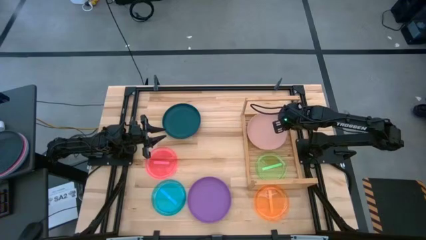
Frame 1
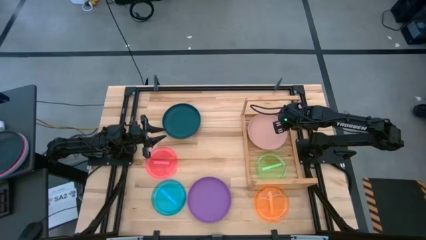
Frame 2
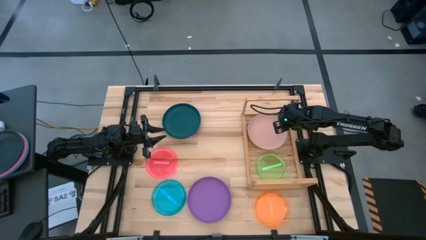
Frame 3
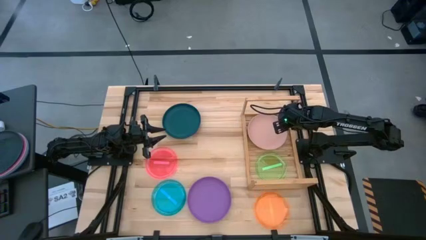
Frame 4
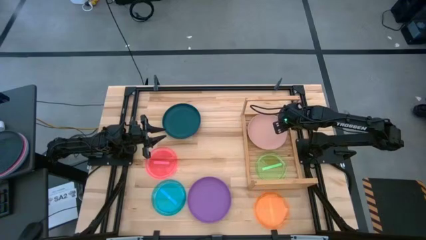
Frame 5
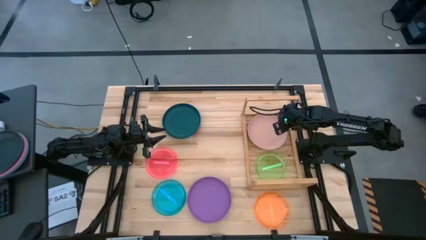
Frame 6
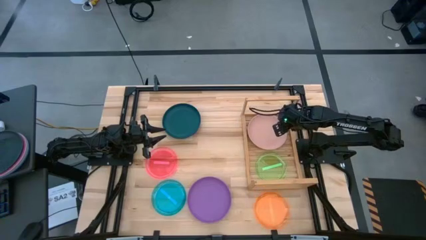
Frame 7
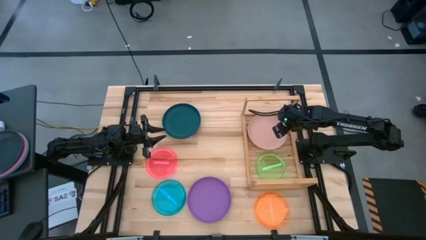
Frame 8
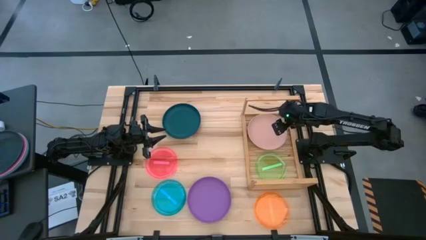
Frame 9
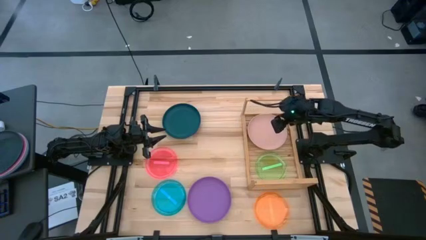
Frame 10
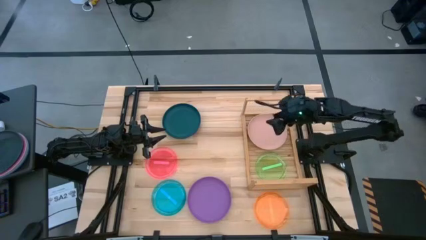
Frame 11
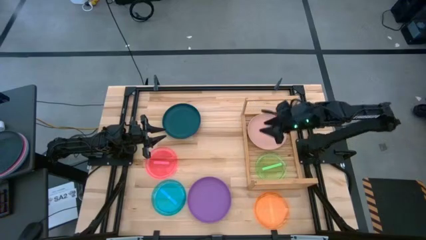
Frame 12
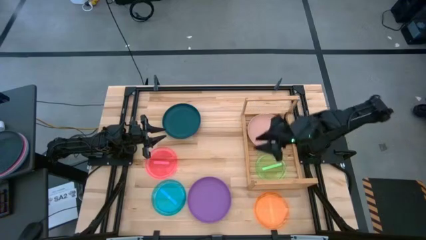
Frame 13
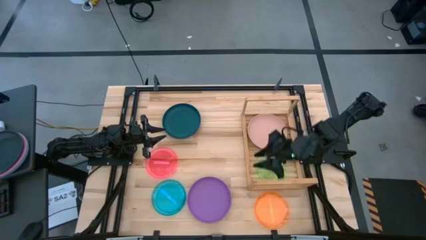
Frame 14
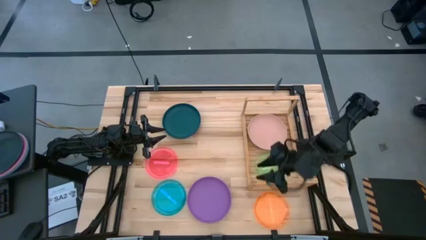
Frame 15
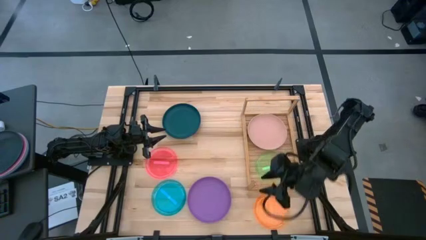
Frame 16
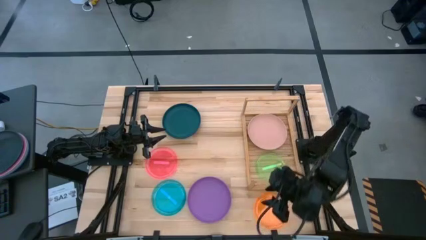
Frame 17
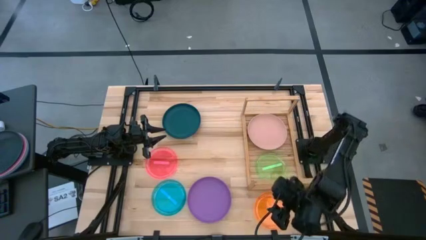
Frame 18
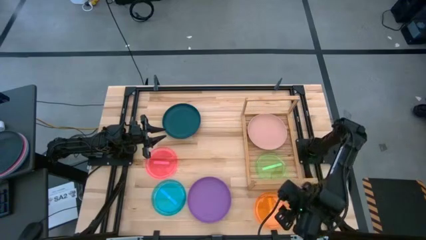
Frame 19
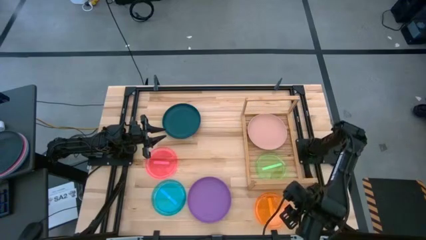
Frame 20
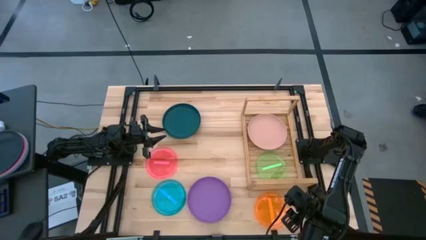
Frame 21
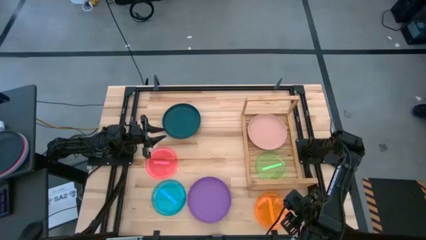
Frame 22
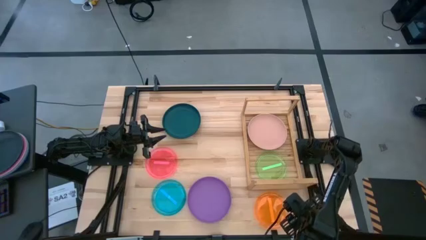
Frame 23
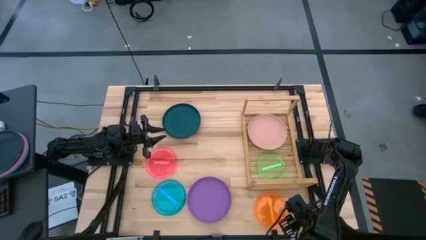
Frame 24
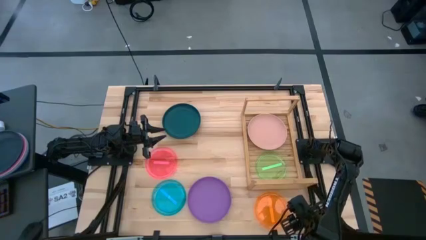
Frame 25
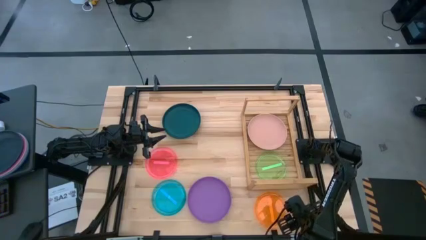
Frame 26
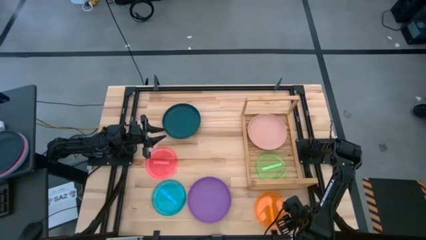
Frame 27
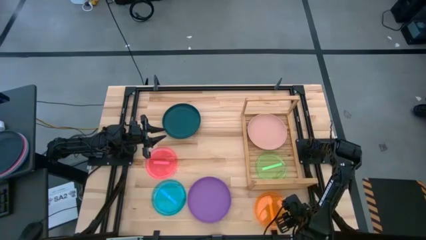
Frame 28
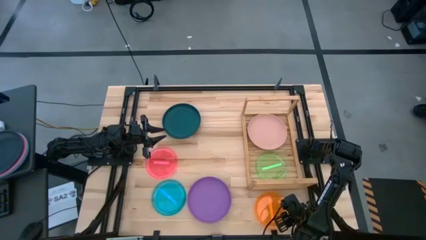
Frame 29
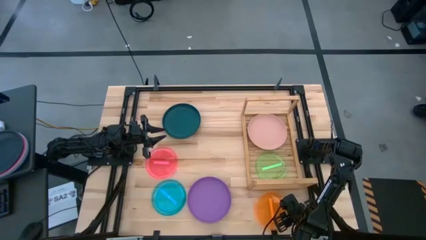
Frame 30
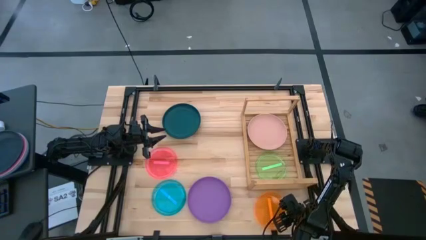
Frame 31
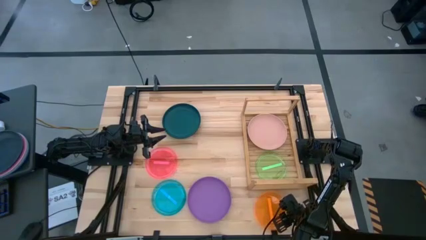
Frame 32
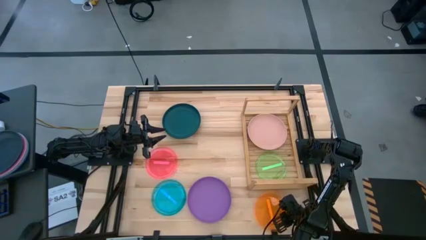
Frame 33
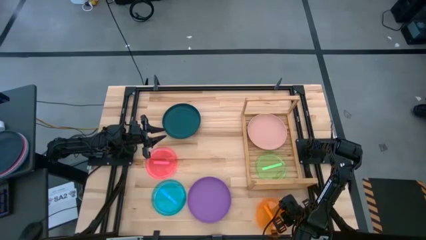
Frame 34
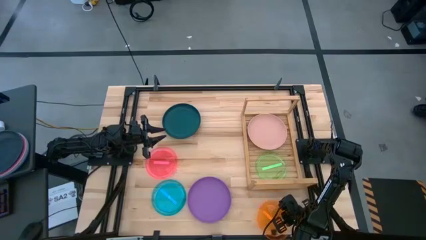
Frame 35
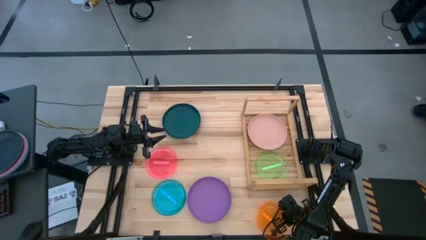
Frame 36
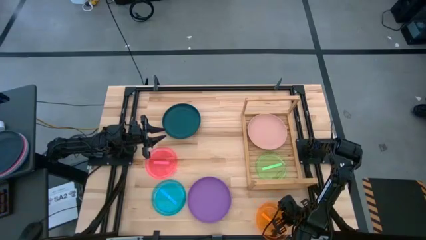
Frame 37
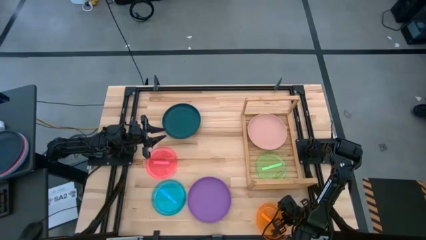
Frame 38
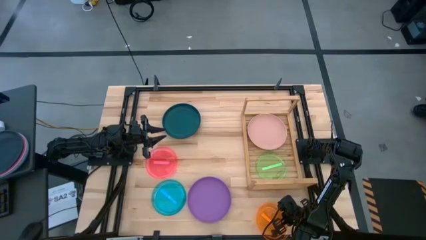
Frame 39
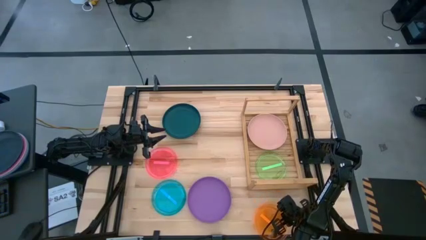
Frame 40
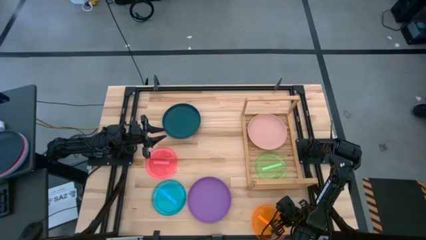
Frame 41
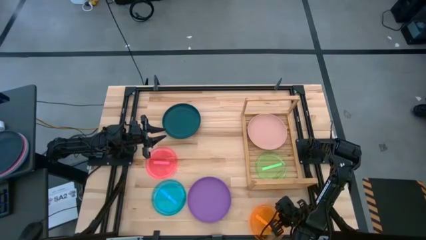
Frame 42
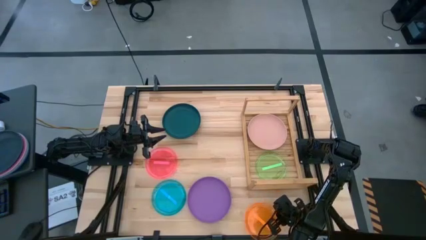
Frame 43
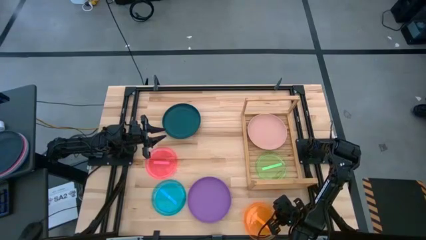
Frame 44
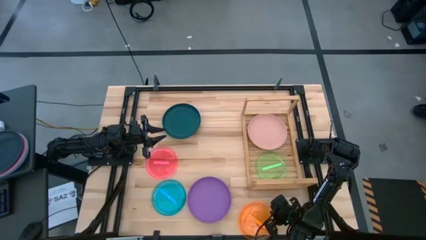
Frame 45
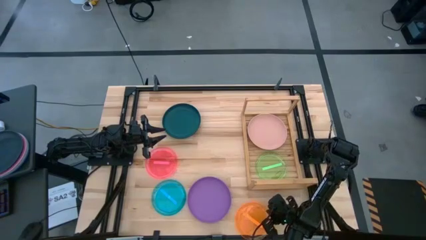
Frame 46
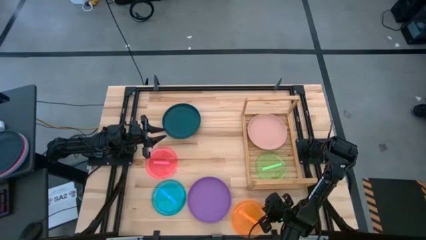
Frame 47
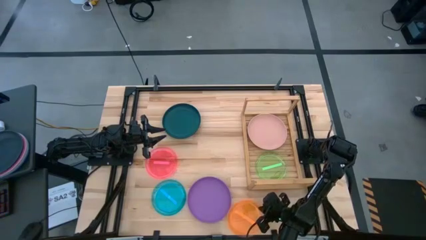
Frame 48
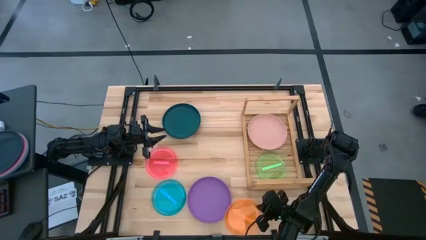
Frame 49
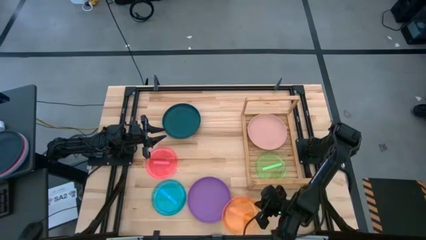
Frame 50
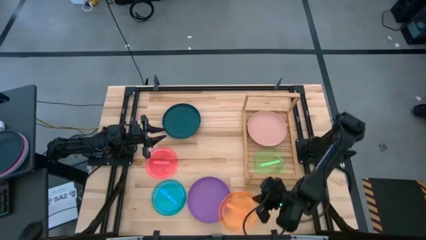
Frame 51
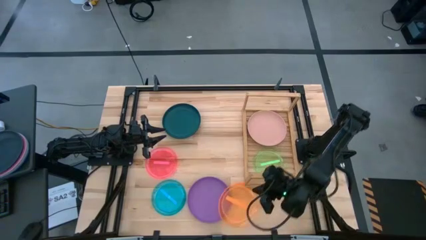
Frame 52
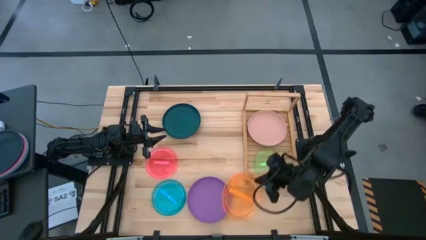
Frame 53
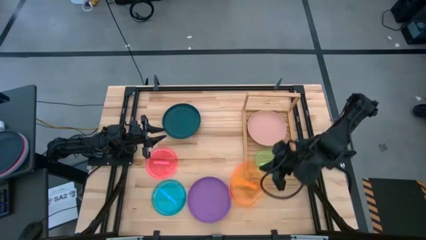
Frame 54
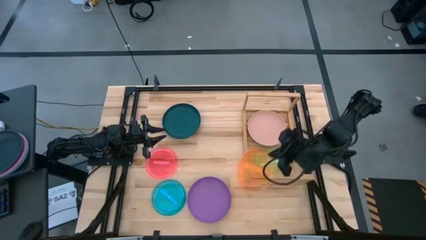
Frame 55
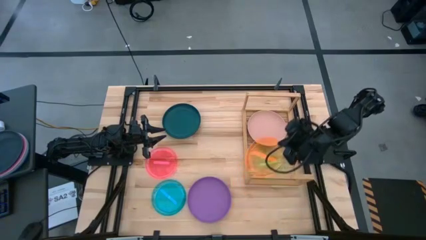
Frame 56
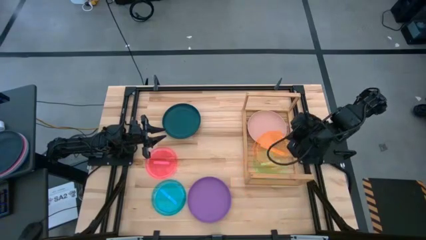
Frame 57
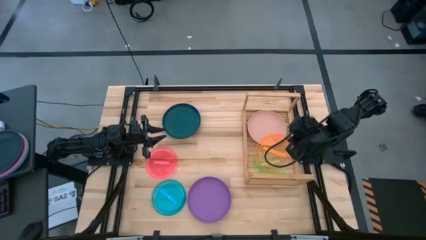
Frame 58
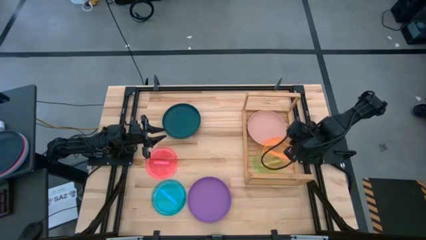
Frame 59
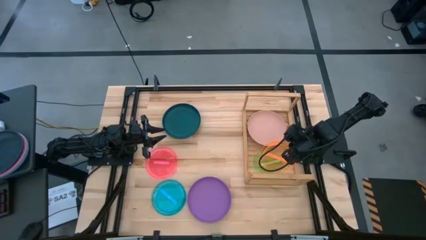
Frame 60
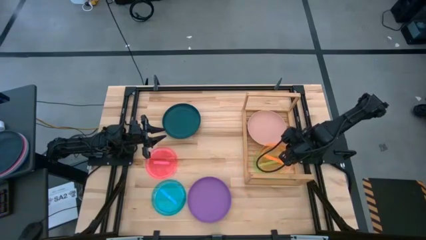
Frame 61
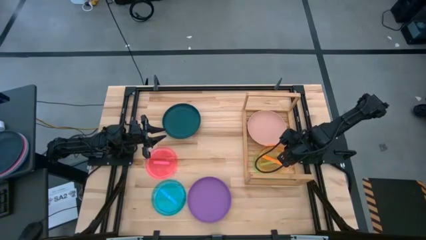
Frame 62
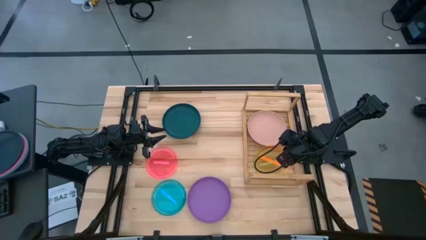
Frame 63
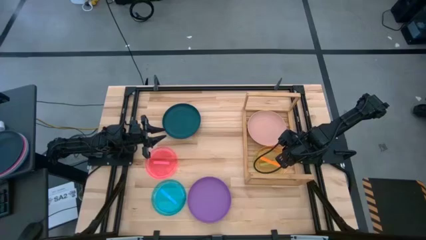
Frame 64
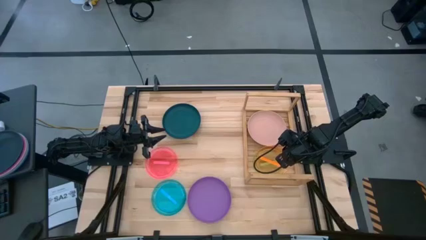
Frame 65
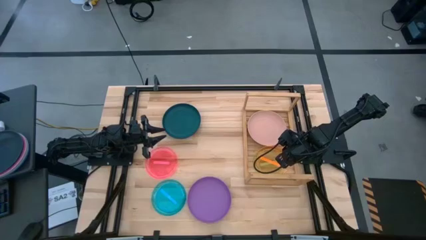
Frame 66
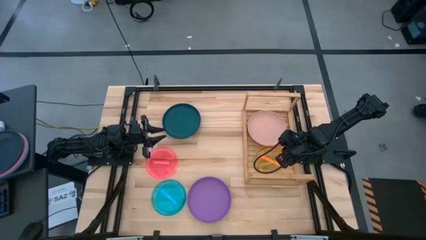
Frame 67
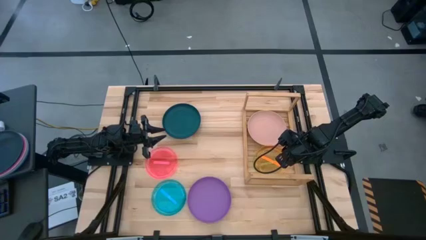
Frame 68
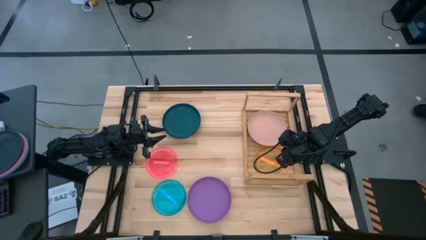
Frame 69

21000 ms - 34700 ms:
Task: Place and stack plates onto a shelf
Stack the orange plate on top of the green plate on the shelf
